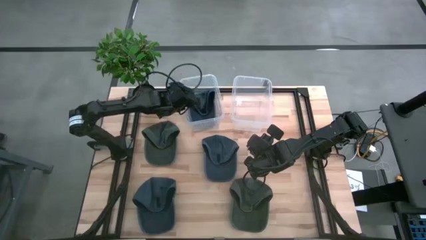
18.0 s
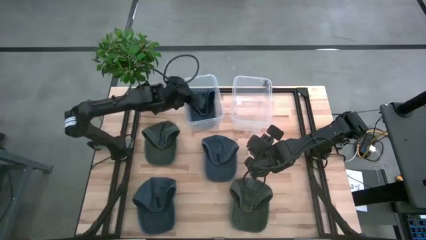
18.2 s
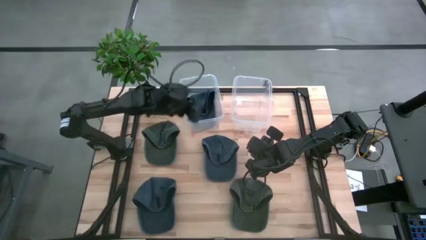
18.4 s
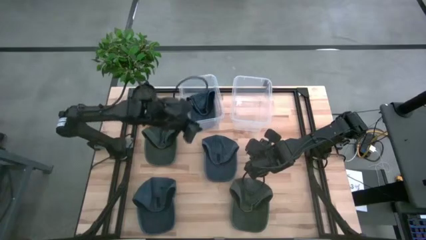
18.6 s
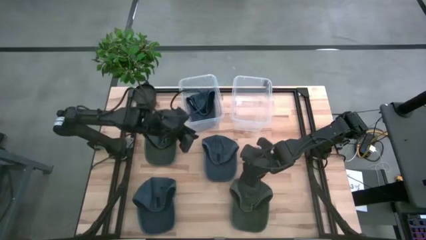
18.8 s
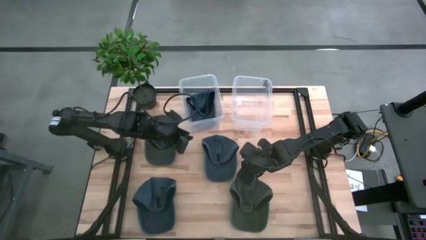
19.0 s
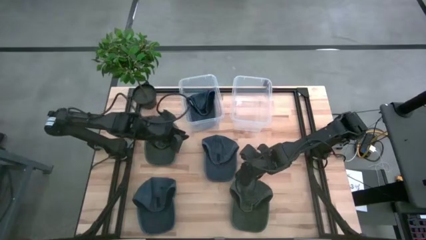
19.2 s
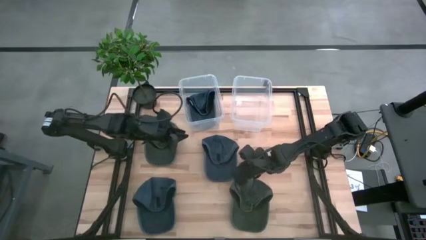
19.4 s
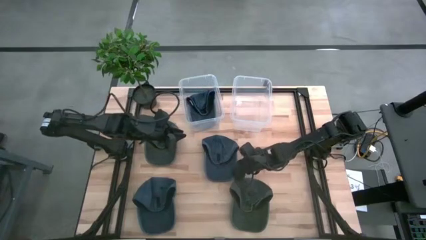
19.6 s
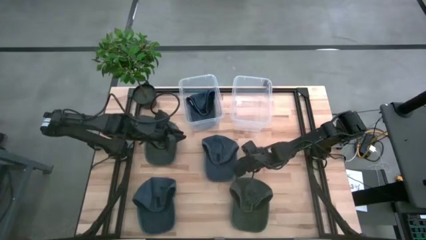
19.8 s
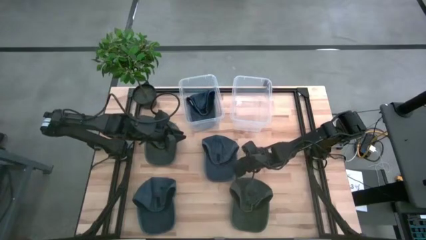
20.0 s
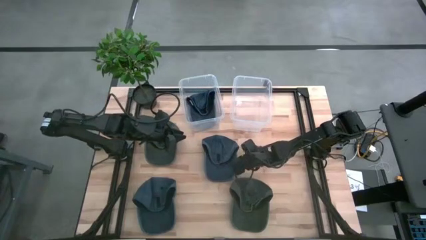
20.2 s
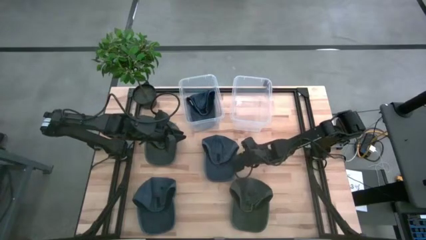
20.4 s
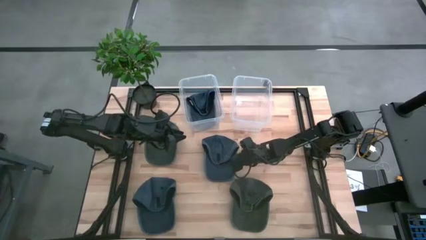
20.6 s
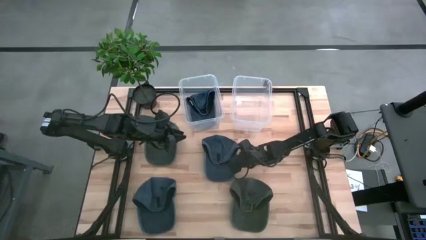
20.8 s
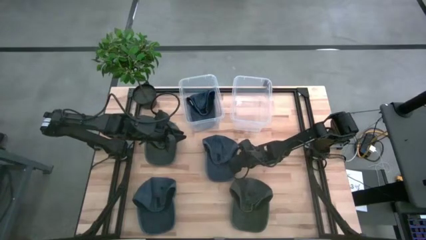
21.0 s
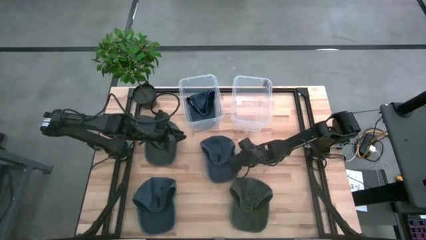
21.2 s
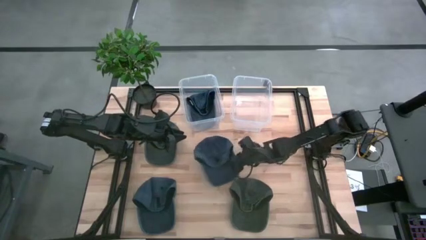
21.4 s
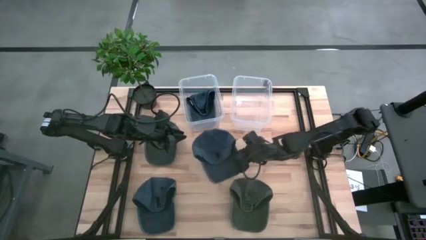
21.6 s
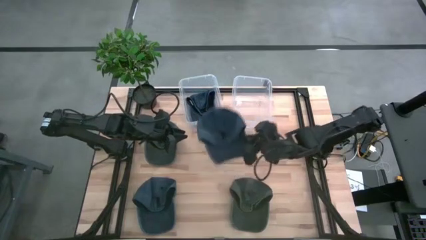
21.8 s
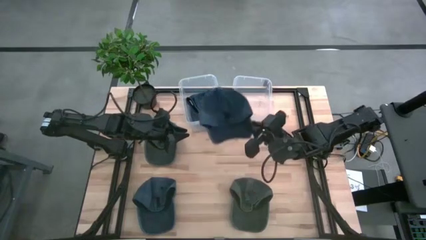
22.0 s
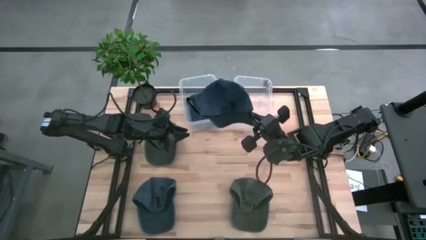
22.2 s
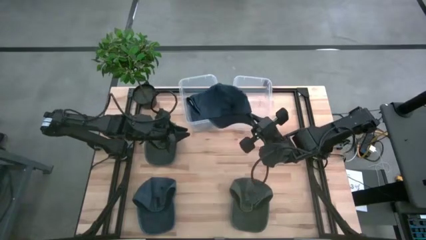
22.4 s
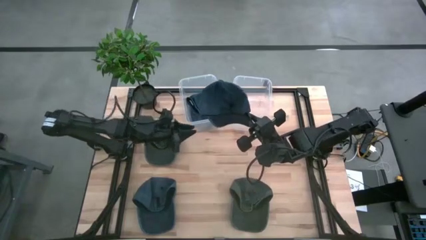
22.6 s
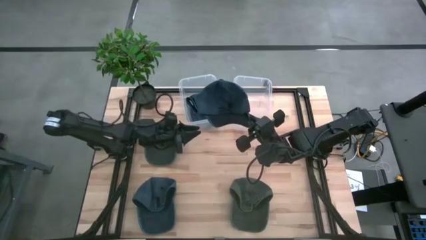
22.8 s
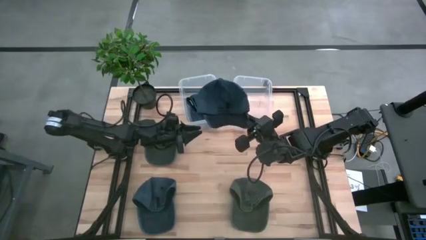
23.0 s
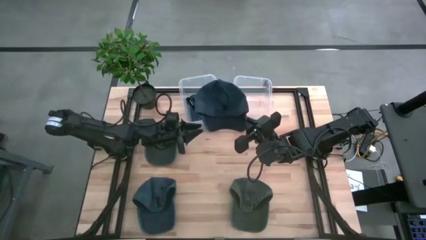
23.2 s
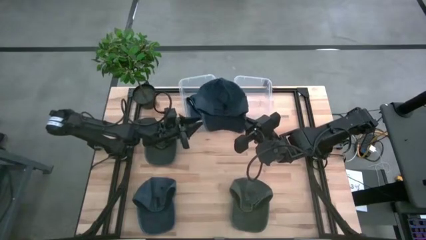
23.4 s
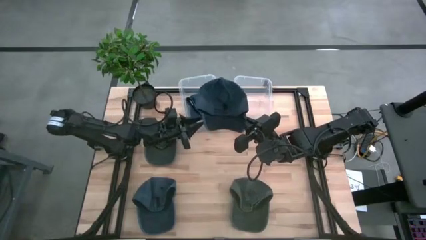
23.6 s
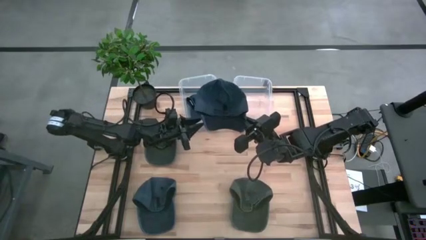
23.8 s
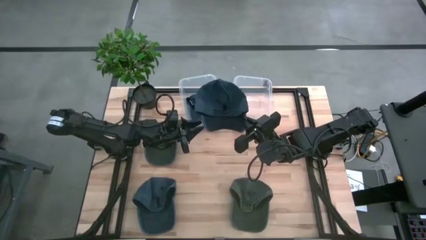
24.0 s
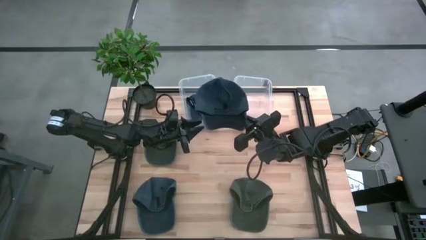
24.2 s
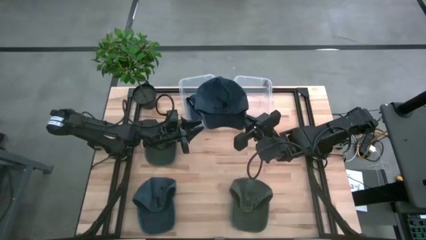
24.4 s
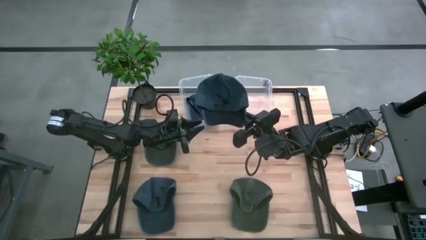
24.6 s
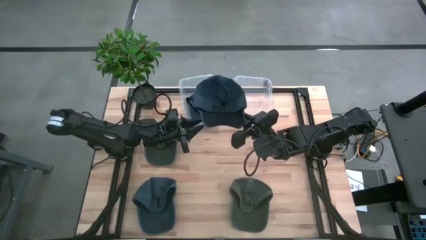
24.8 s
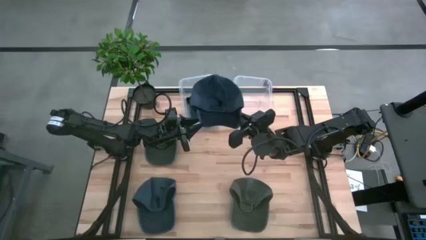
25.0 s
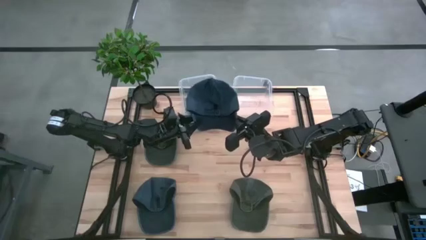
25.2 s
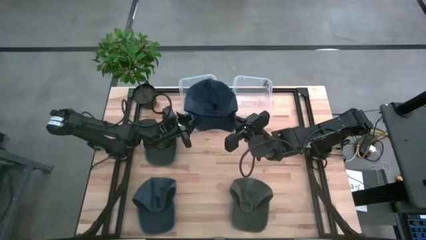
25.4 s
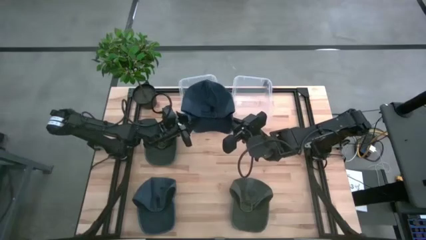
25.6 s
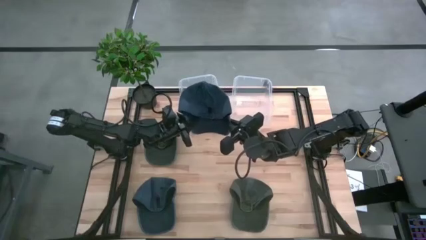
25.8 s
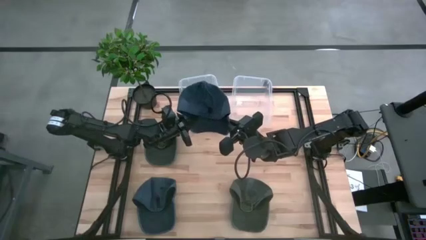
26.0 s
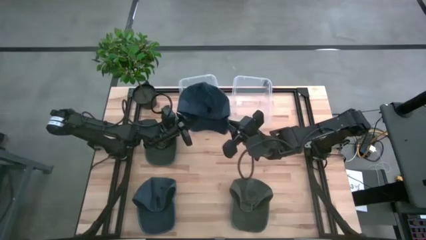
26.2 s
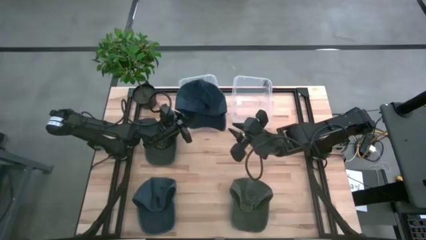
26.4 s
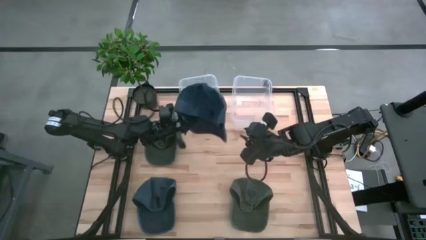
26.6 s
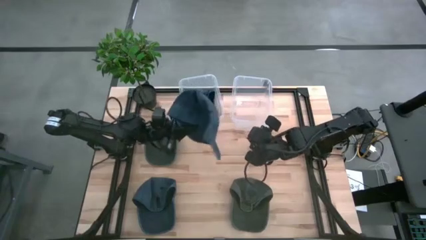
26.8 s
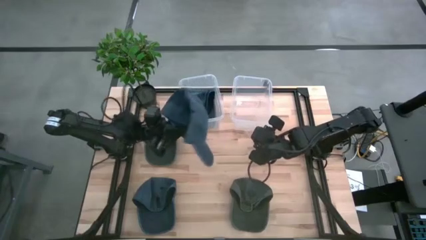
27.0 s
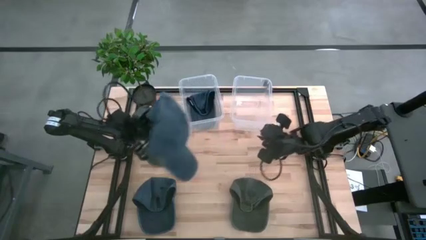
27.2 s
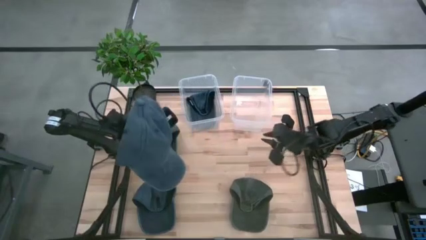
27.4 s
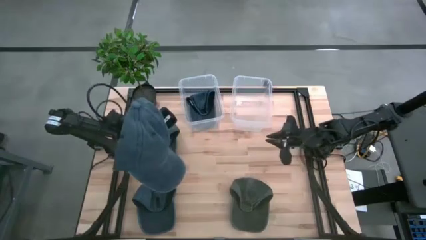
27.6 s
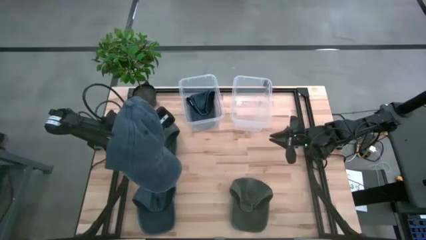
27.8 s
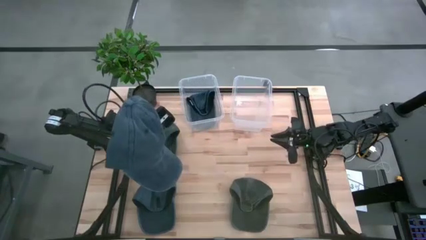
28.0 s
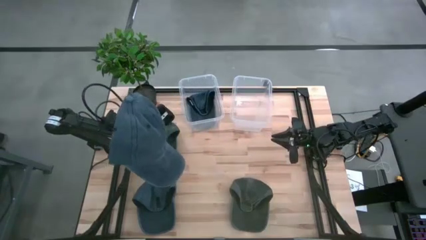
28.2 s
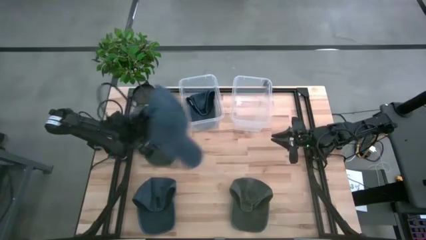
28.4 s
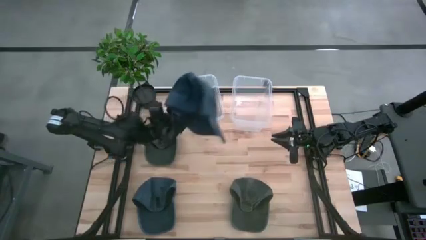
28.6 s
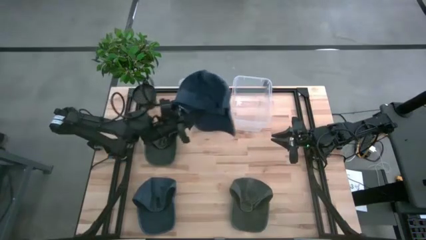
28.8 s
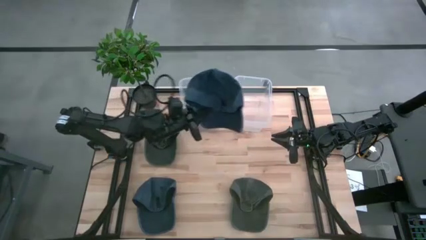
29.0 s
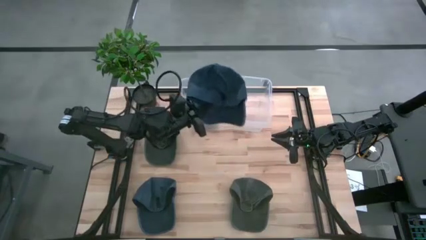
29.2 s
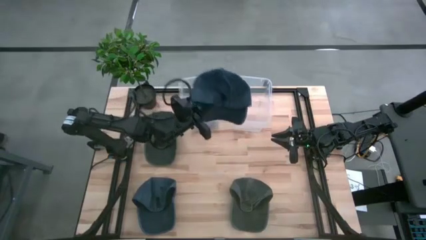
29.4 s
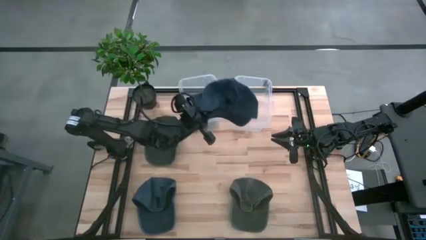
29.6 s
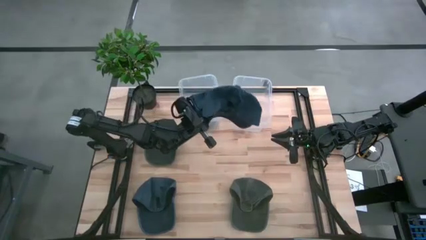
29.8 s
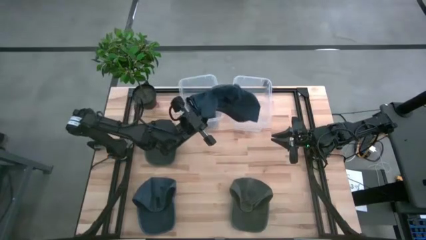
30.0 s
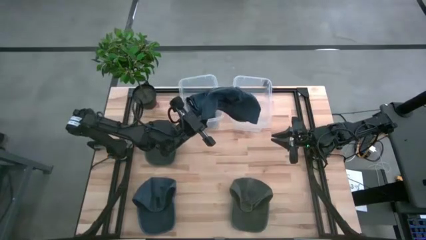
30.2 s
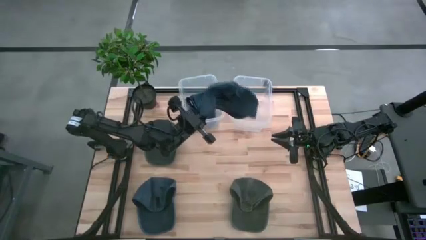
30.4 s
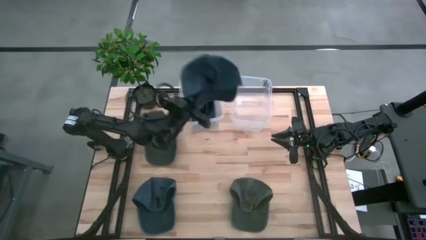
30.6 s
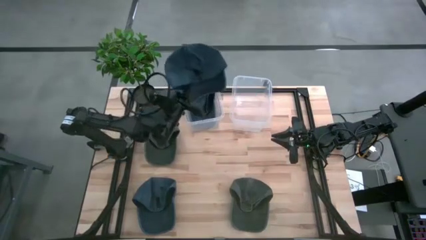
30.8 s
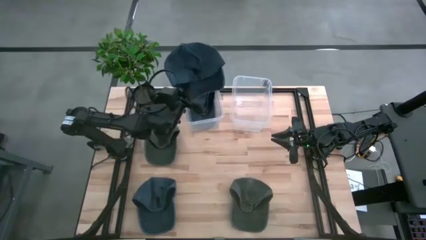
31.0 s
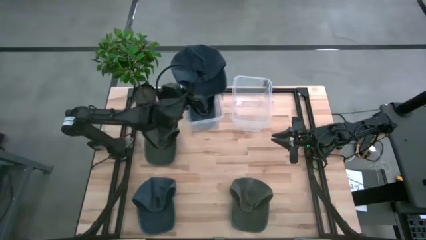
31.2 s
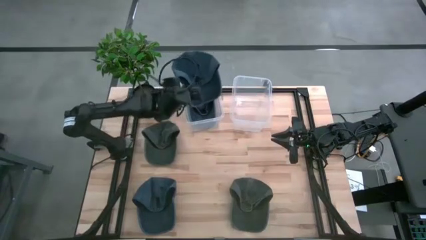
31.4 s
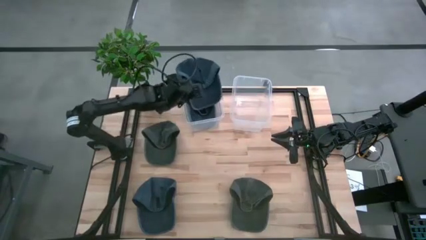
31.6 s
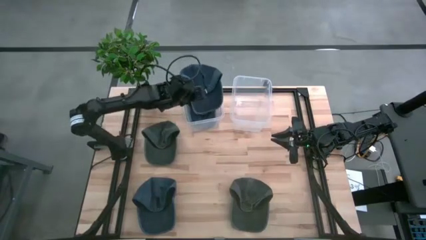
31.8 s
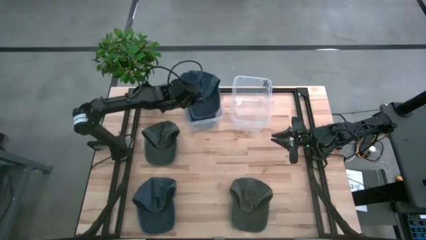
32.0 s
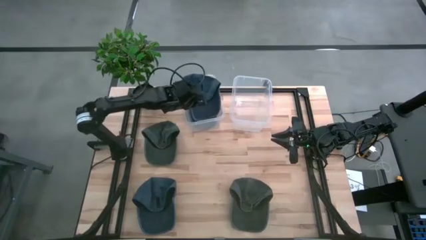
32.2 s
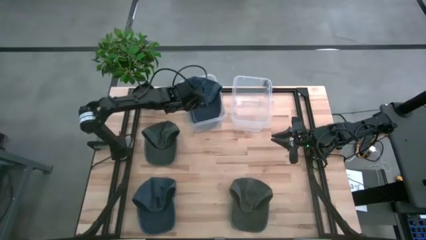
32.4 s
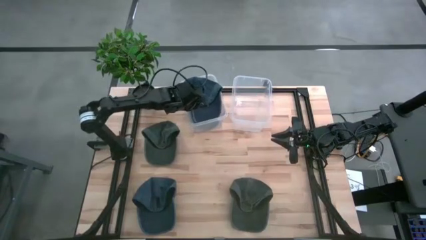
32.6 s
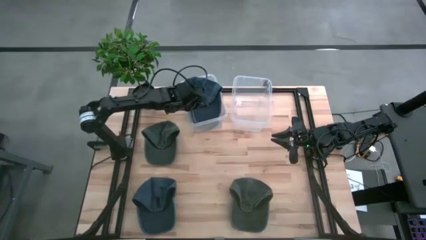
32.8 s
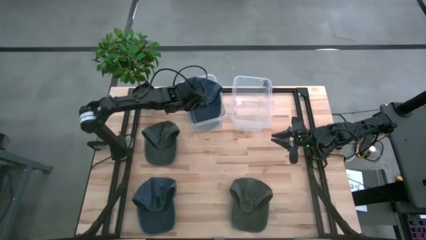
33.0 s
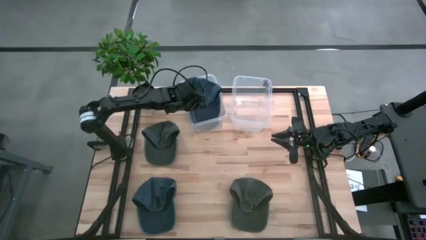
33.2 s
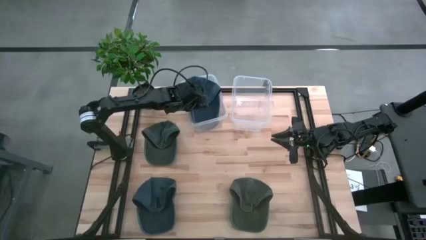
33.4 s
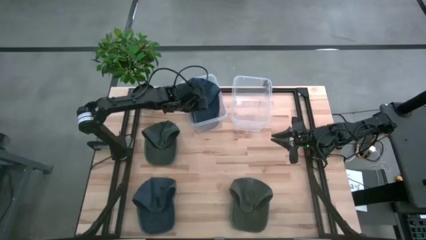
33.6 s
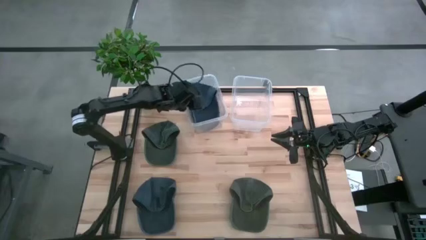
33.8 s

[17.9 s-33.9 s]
Task: Pick & Place hat
Put the top blue cap into the left transparent bin
